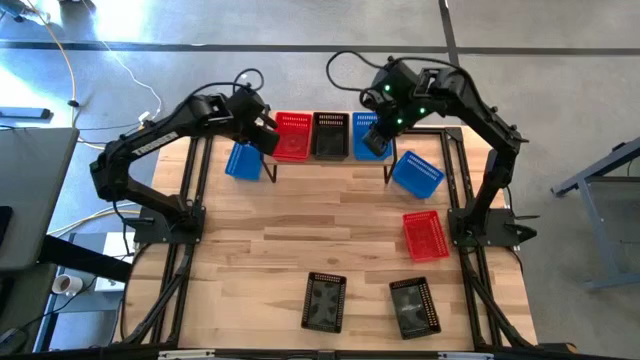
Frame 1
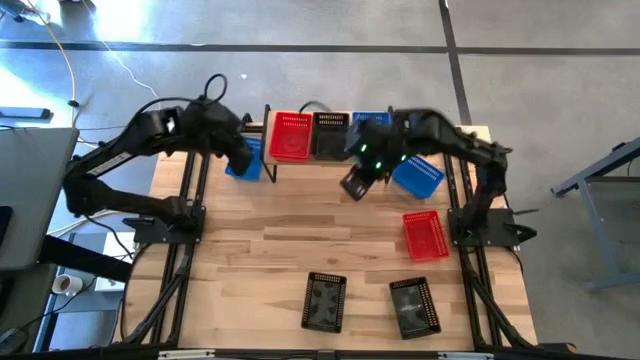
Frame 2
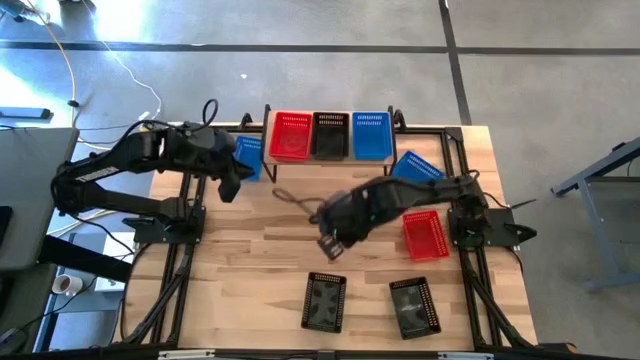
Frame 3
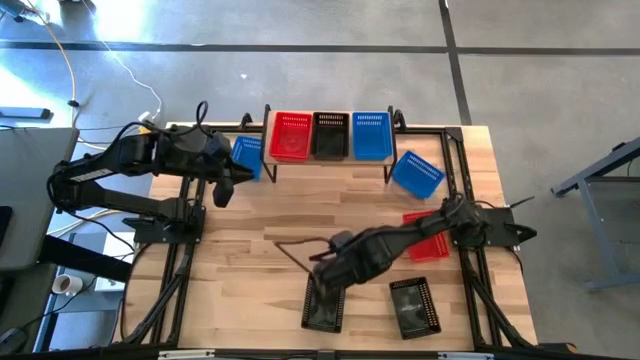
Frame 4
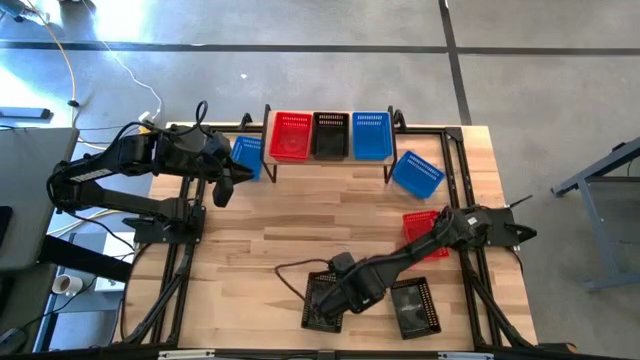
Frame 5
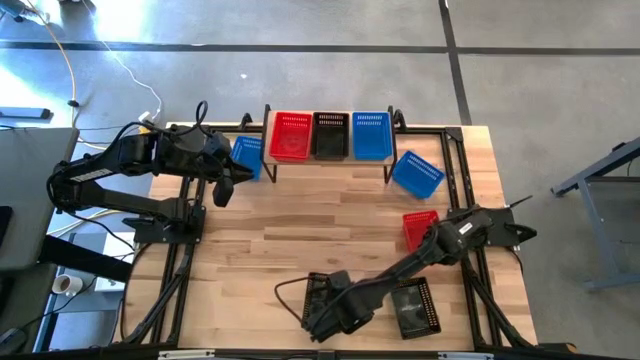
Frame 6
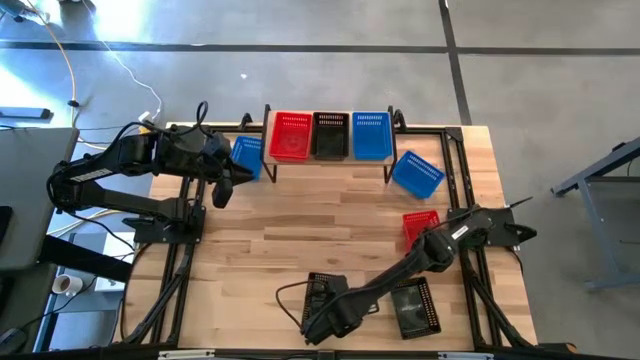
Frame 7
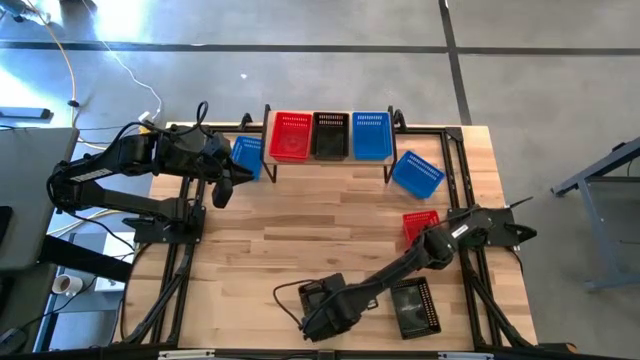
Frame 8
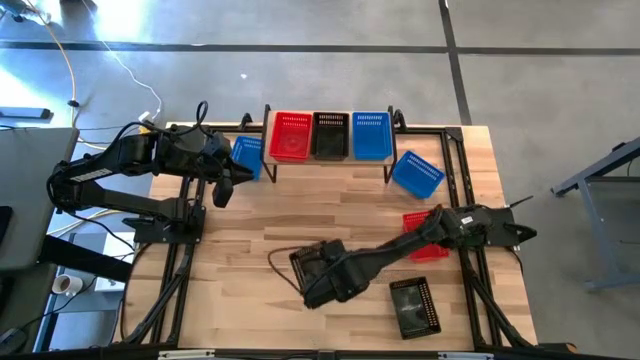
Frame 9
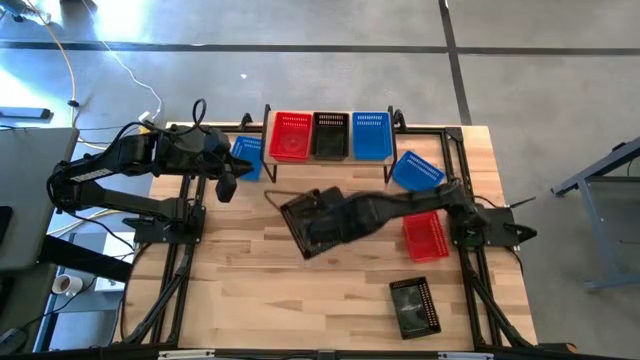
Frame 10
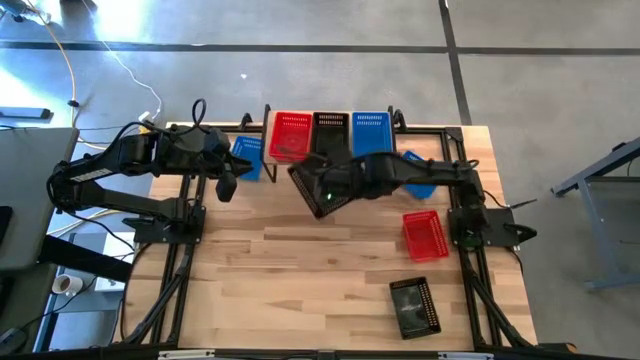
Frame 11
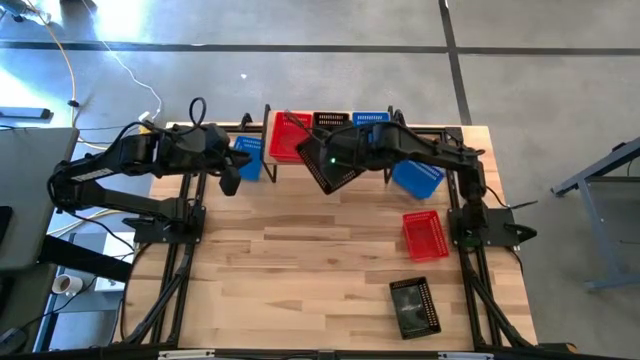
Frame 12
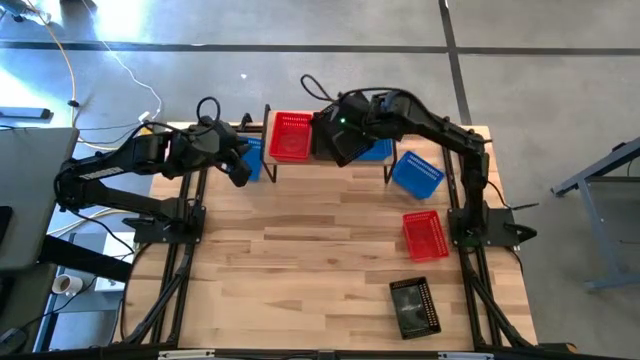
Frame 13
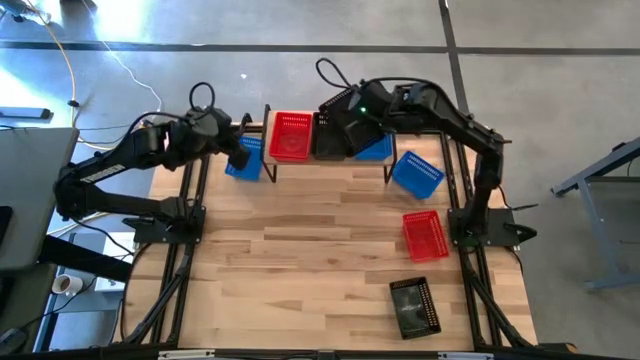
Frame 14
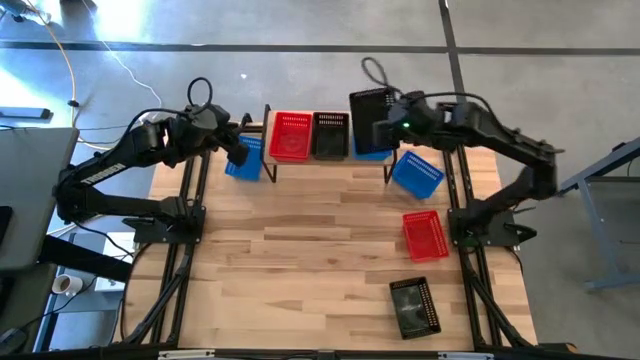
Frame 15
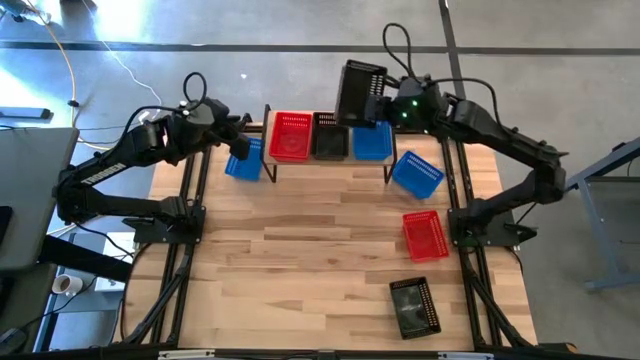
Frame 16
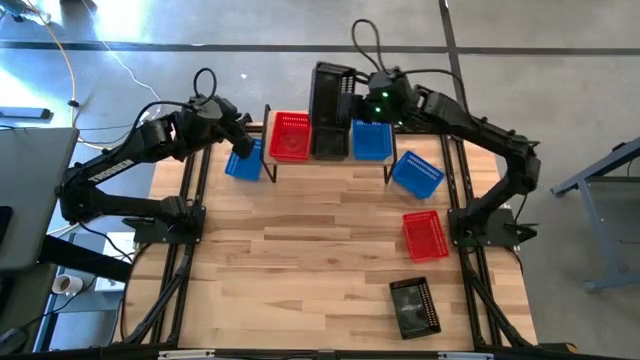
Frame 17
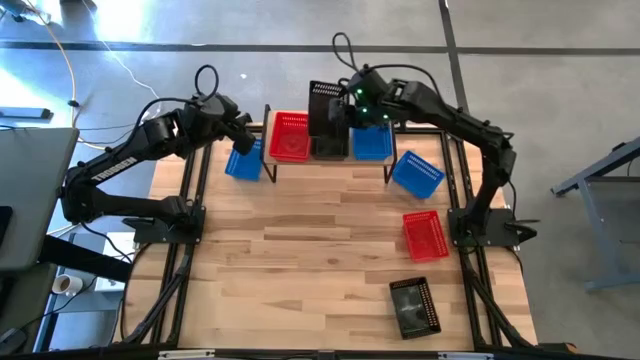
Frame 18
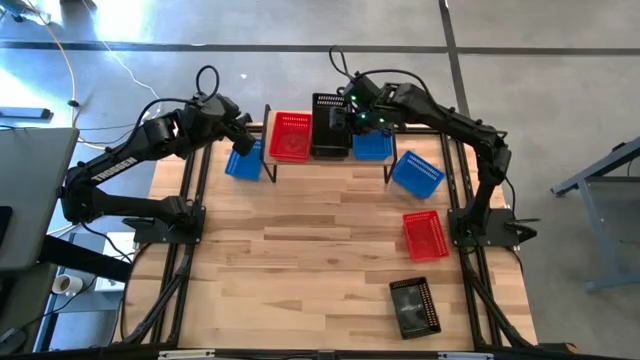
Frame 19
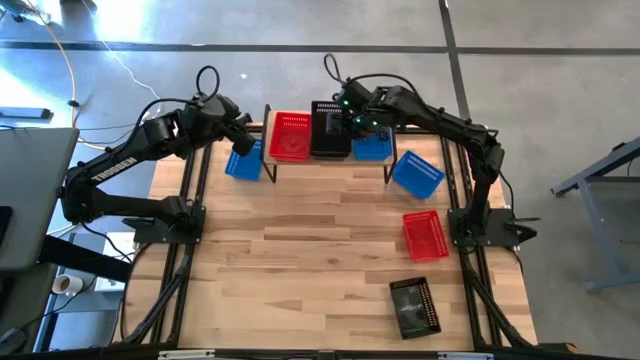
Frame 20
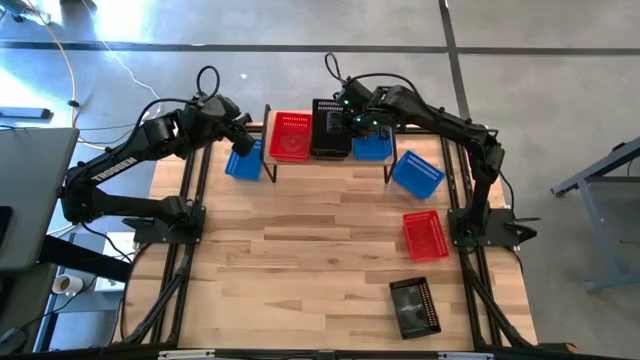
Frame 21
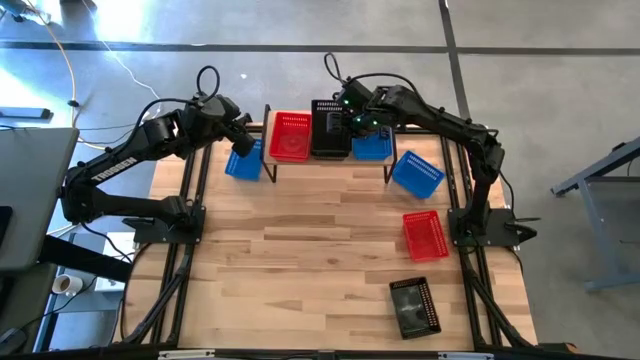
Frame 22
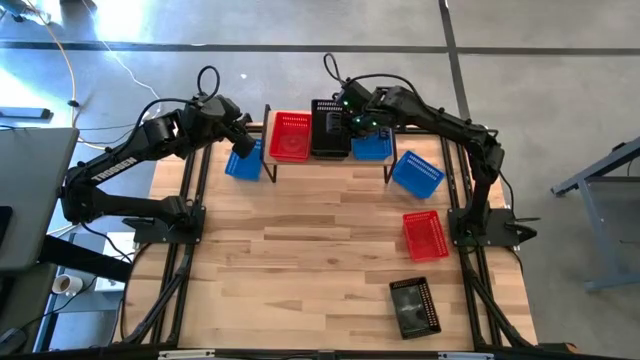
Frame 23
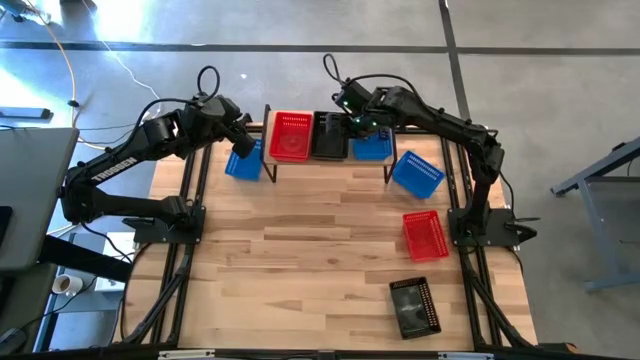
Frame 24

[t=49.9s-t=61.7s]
Task: Stack baskets on shelf by color
Stack the left black bin on top of the black bin on the shelf

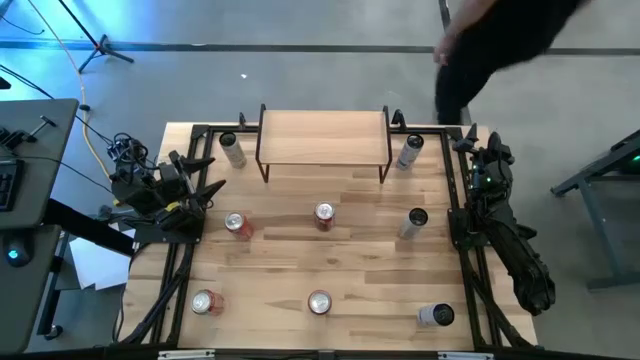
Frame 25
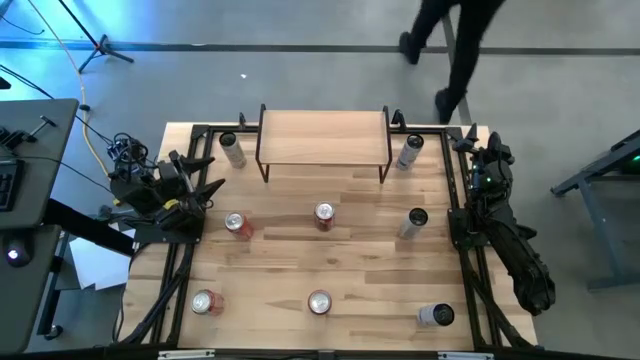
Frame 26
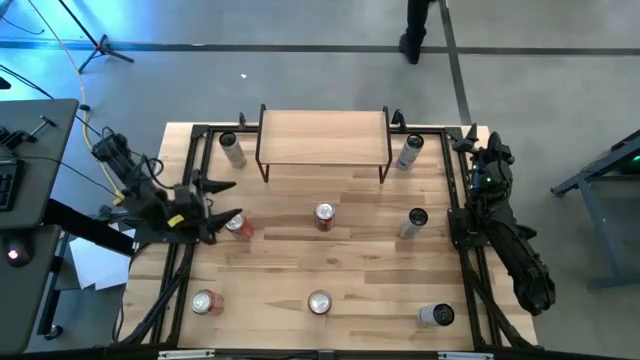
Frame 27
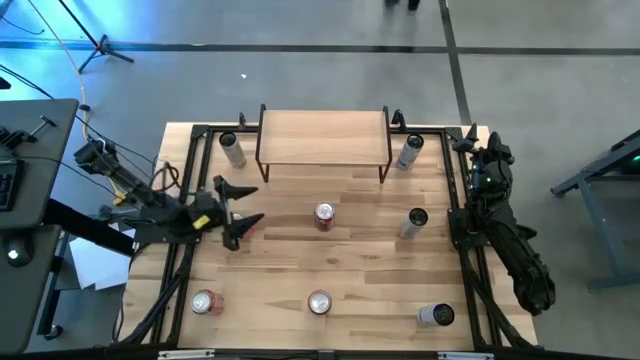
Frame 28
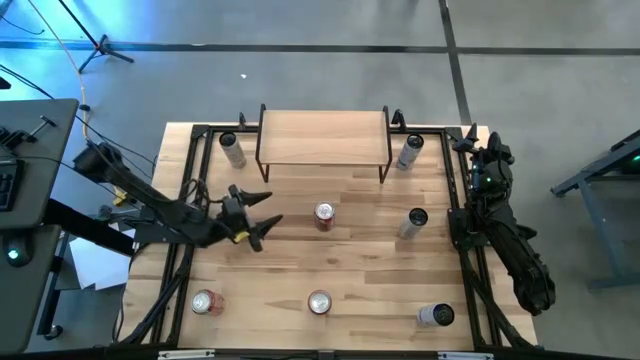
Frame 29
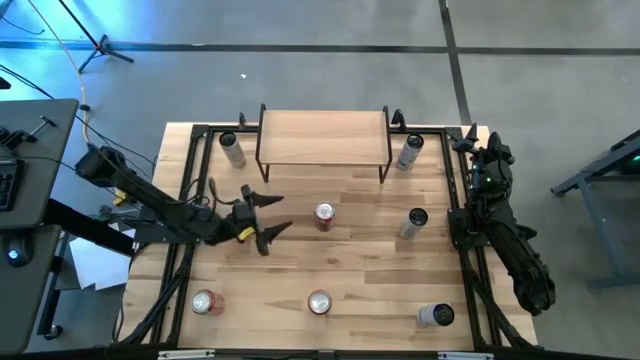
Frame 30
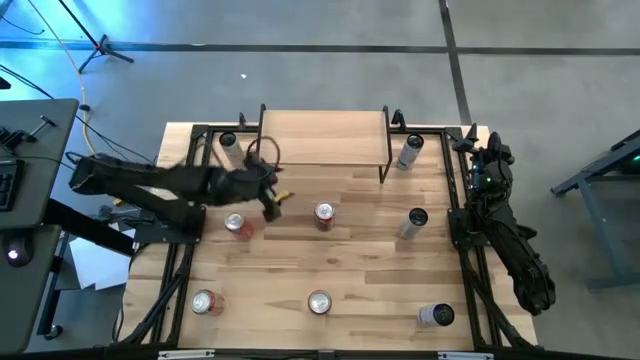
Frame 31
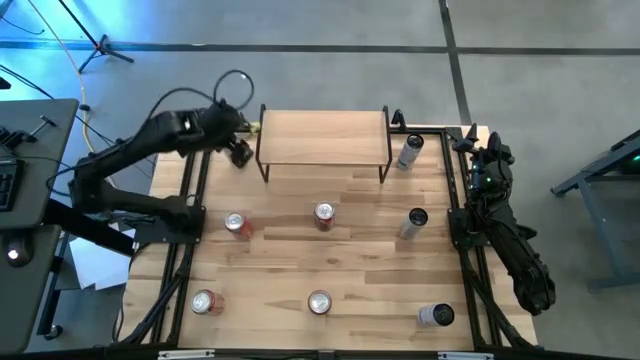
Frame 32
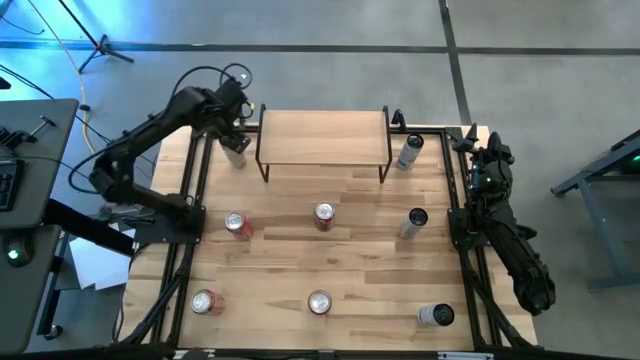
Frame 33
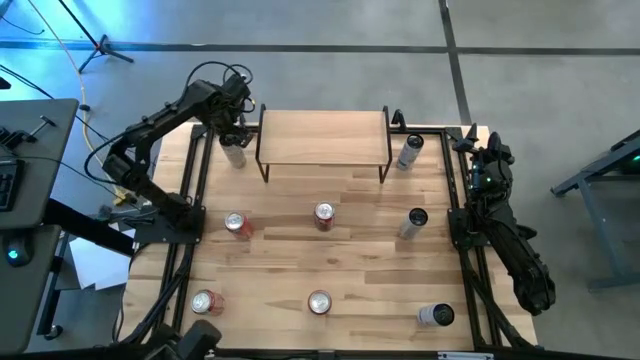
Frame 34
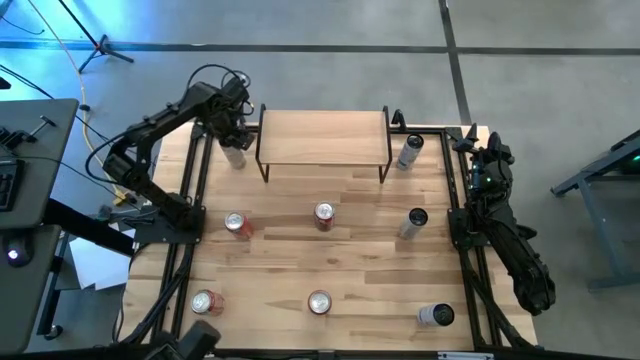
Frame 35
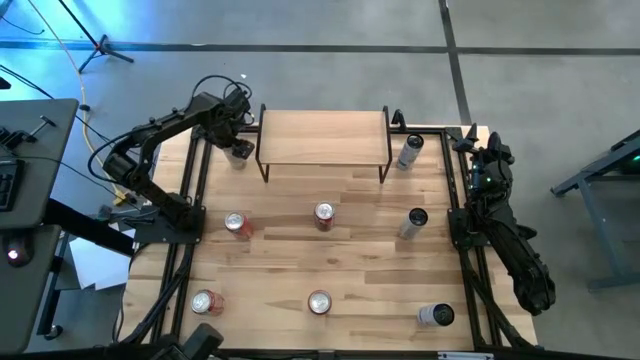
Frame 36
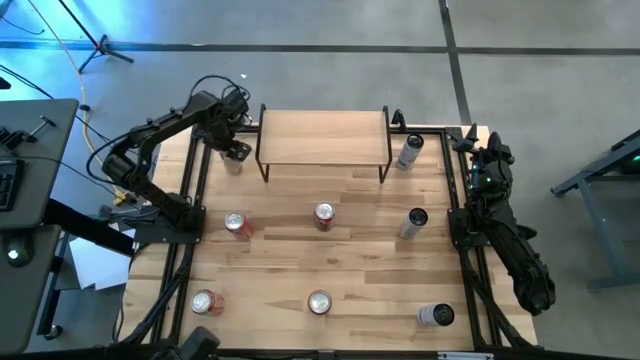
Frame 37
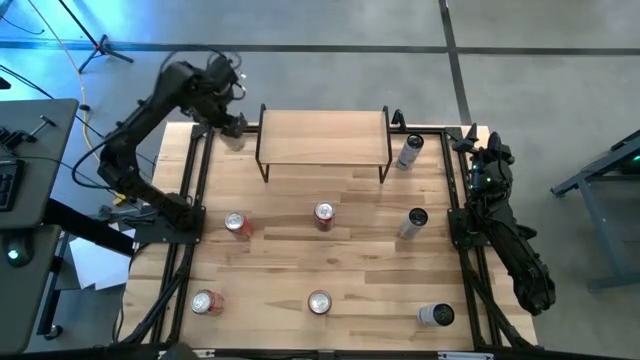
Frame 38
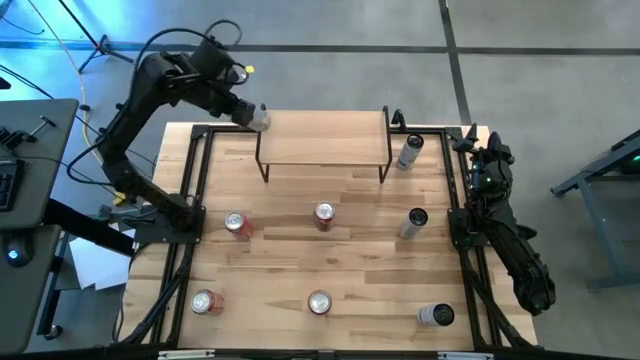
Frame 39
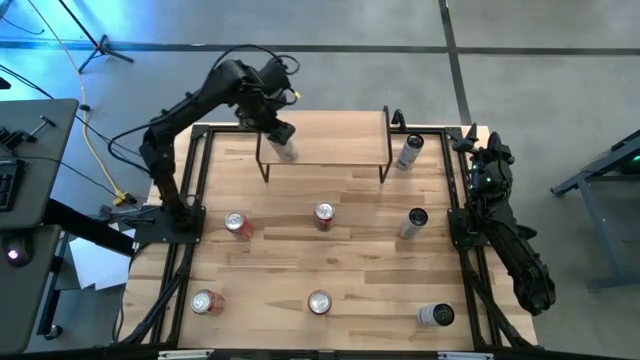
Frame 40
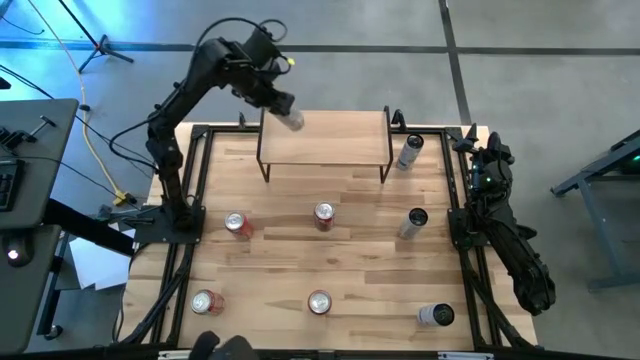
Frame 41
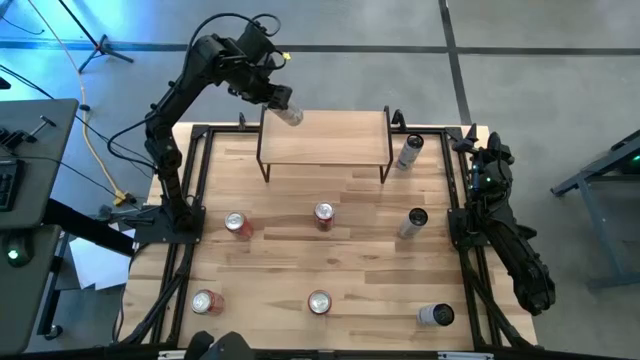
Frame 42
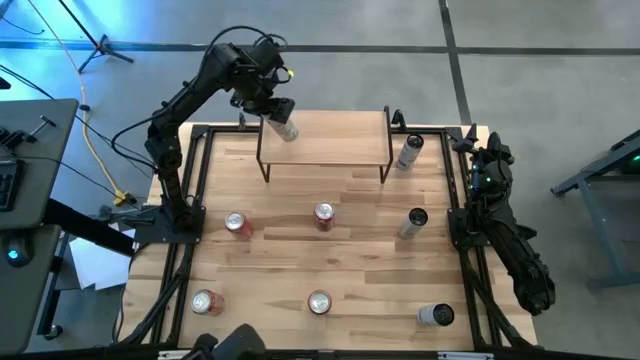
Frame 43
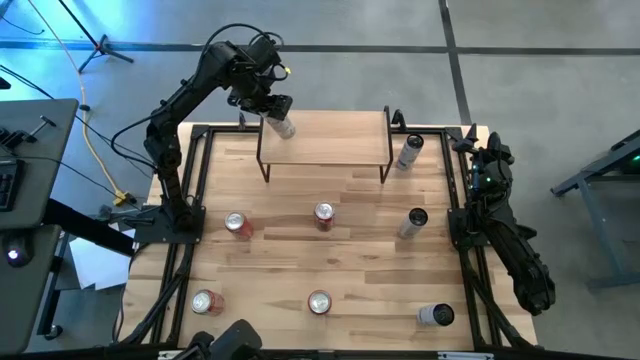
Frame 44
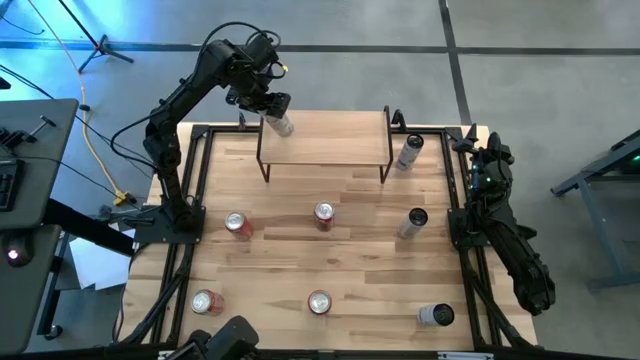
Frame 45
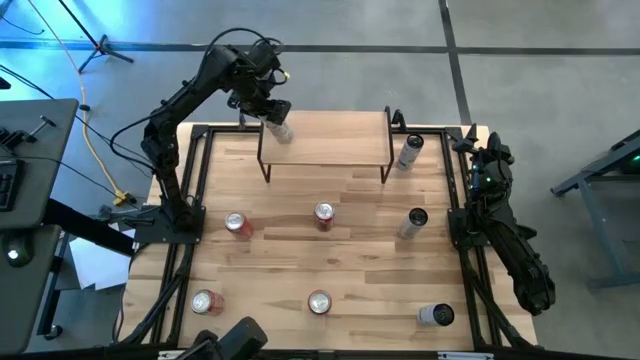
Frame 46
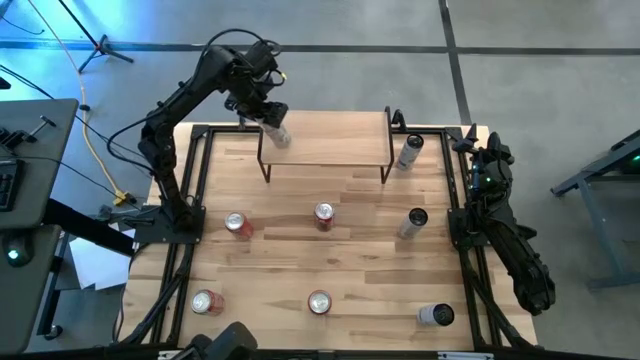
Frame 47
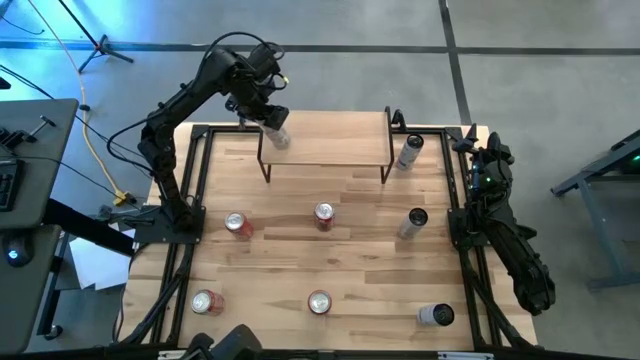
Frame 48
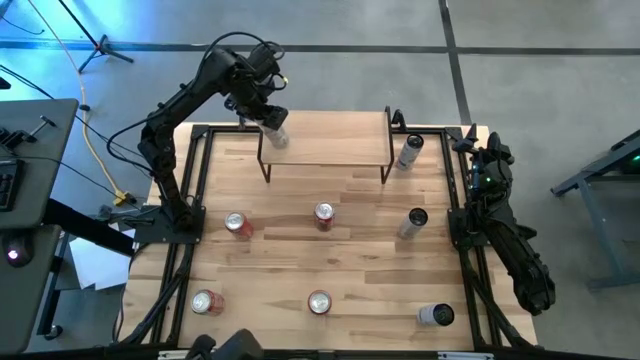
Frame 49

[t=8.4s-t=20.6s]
Task: Place canned beverage on shelf
Put the white and yellow soda can on the shelf
